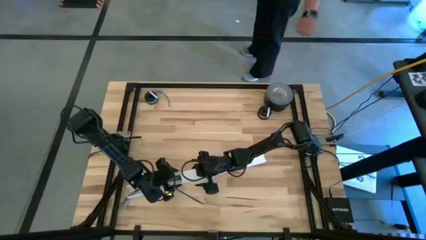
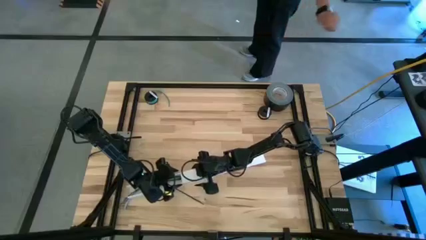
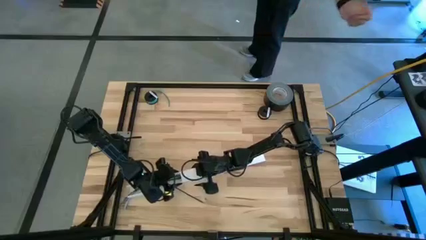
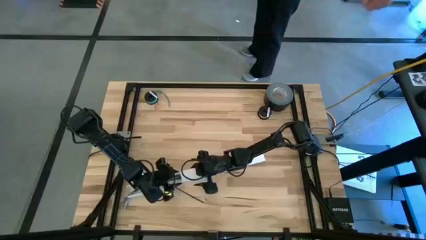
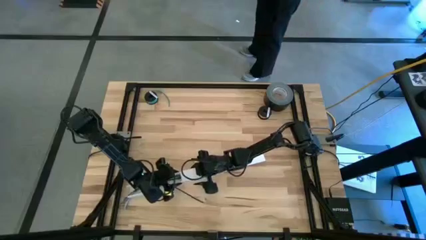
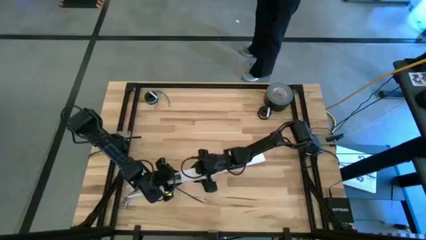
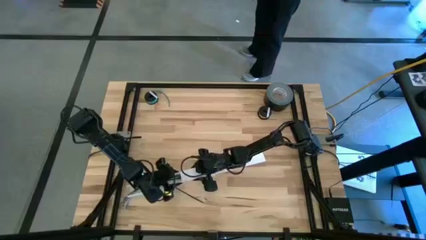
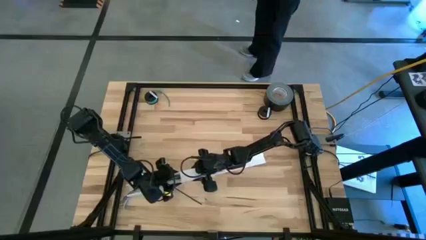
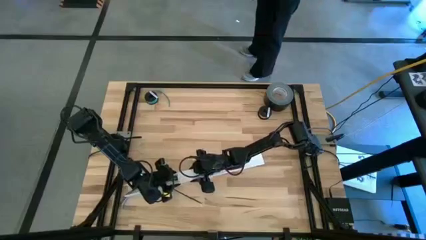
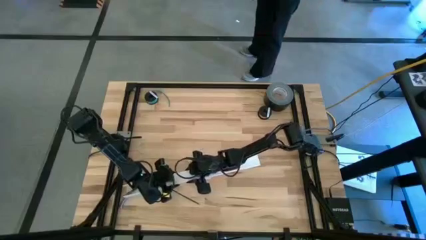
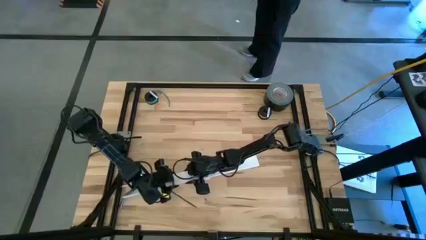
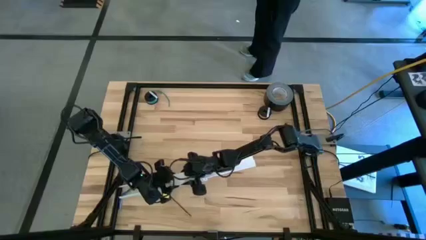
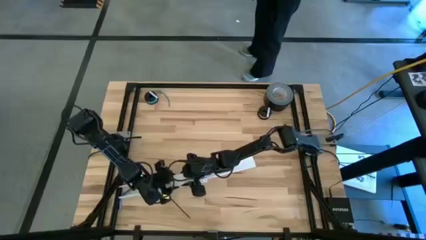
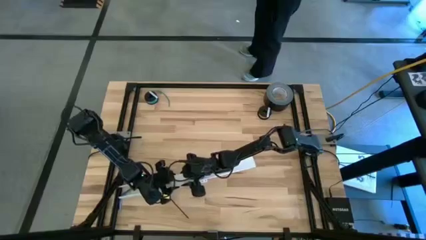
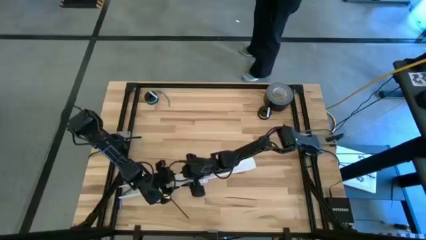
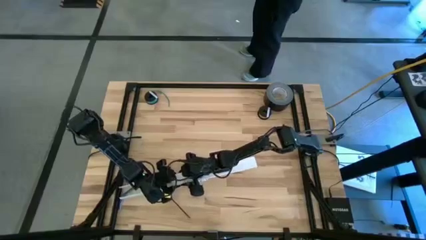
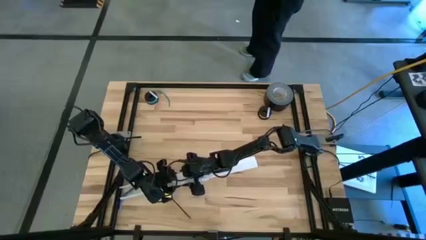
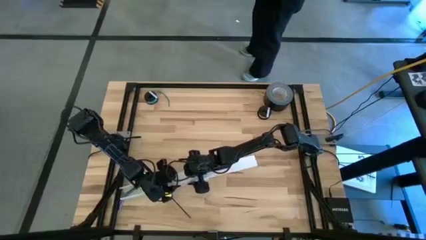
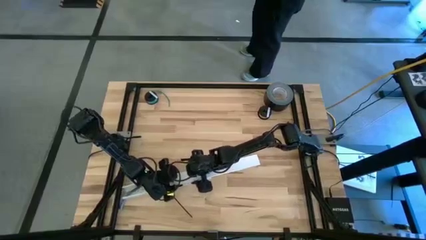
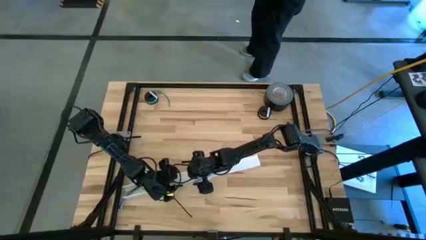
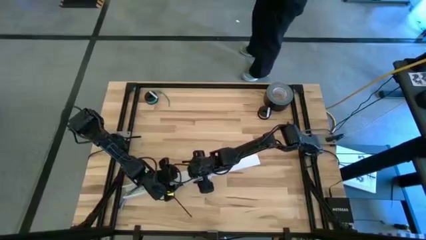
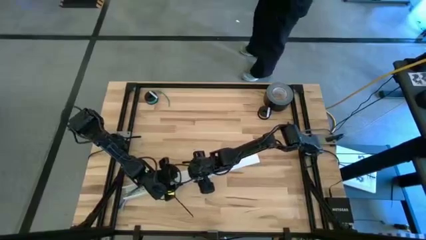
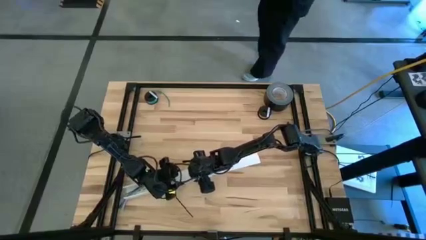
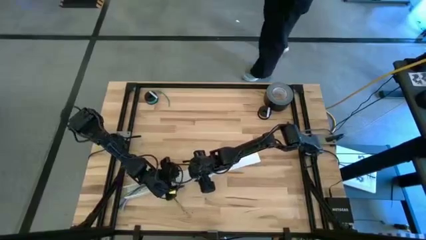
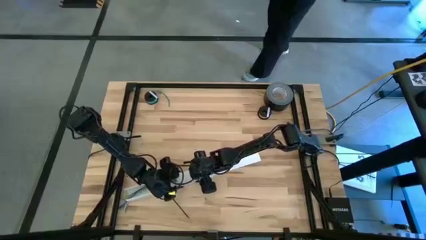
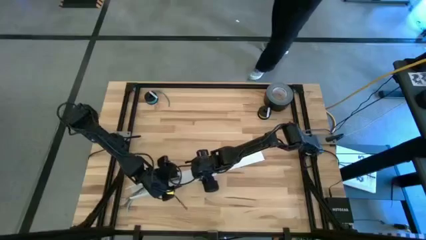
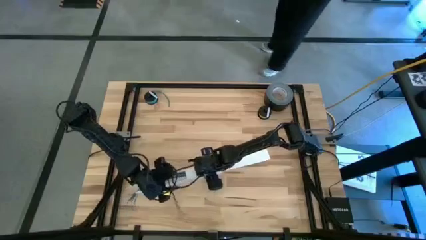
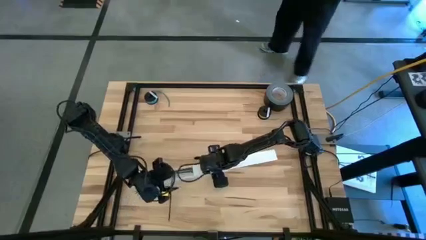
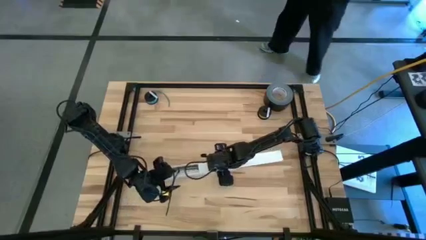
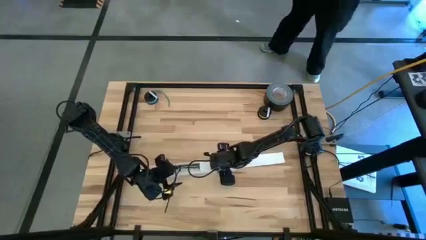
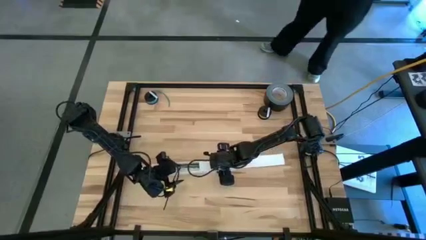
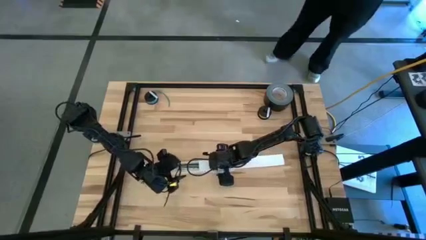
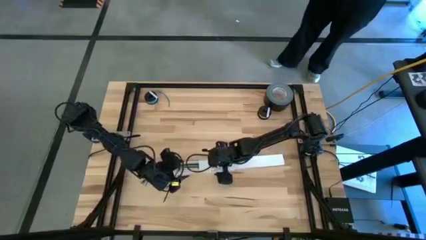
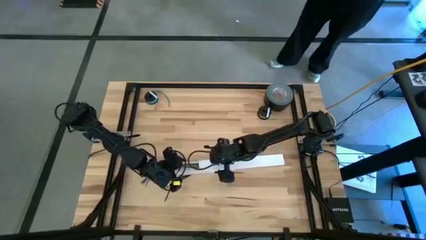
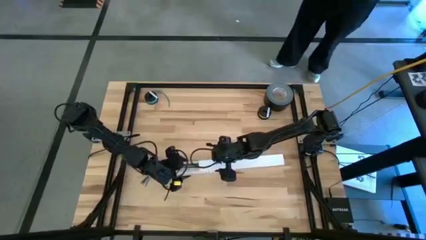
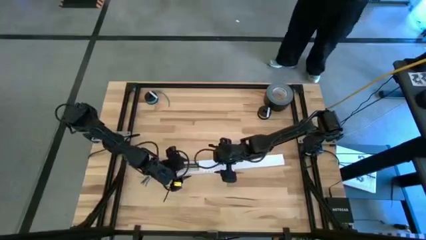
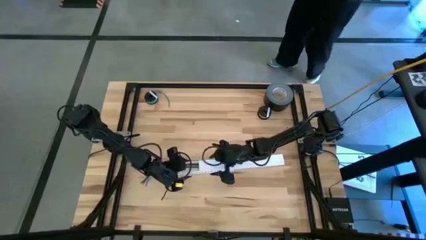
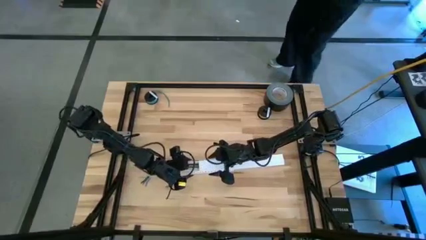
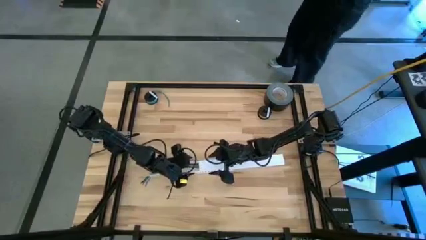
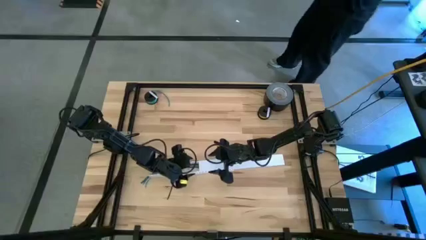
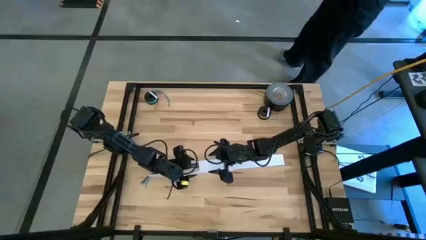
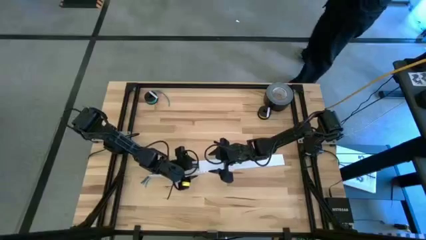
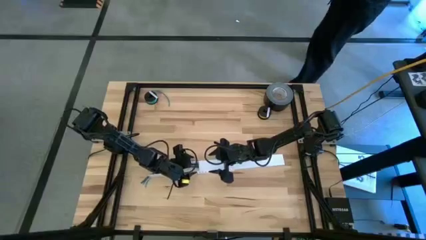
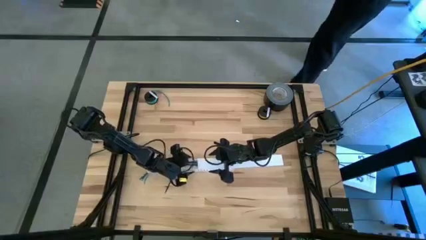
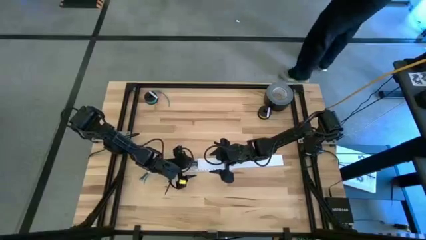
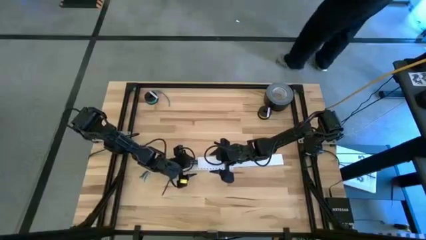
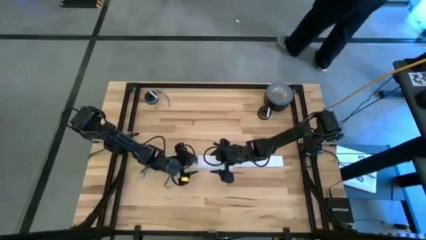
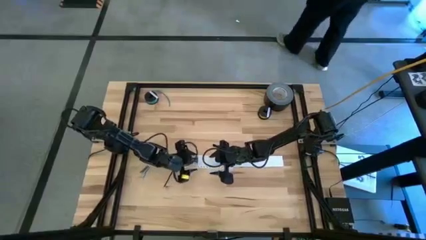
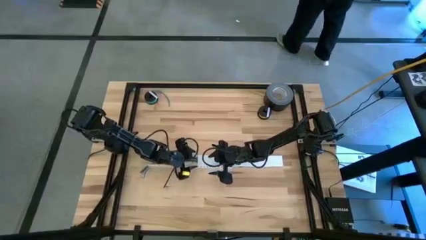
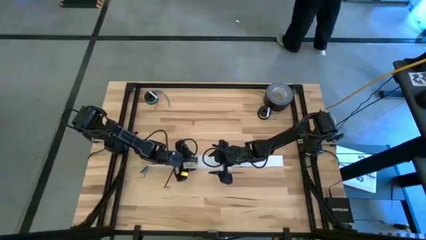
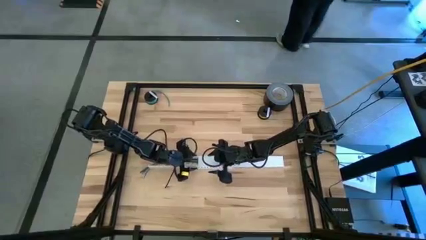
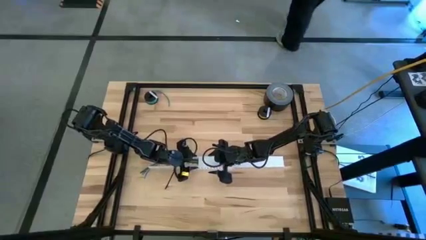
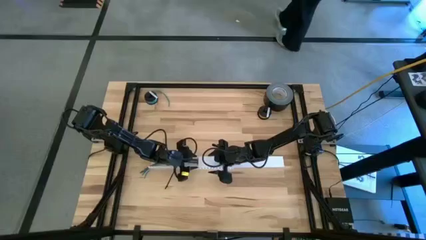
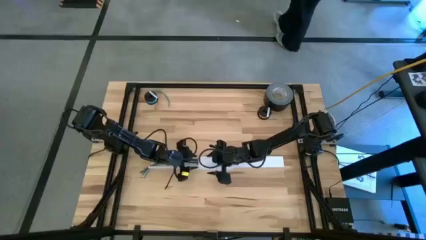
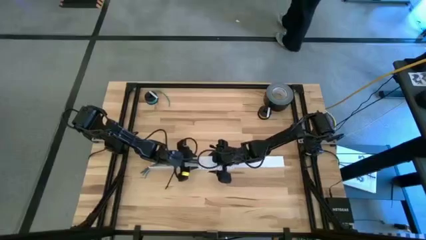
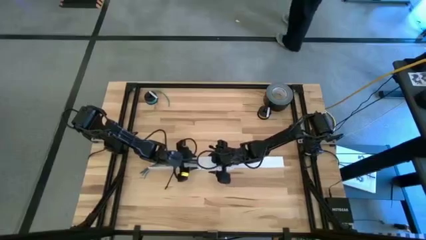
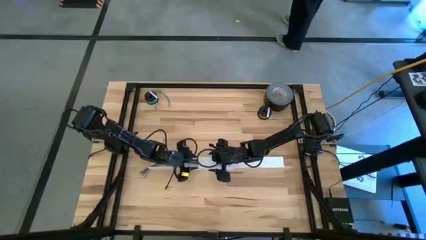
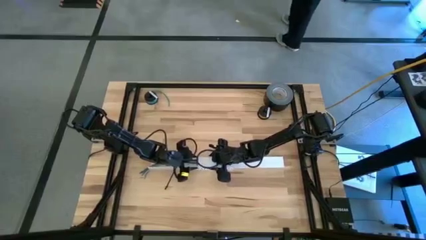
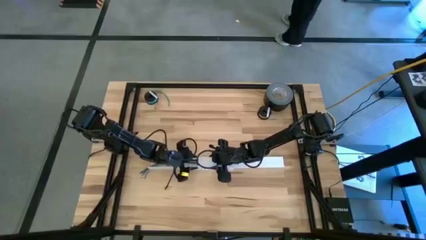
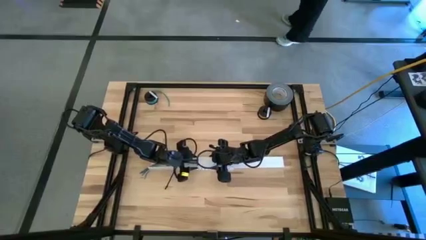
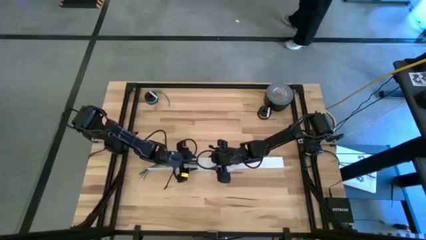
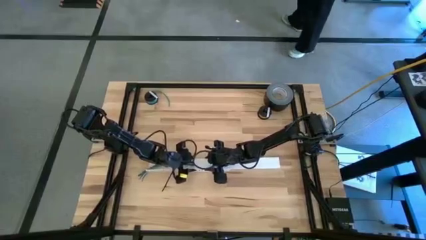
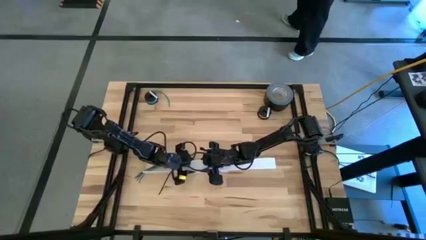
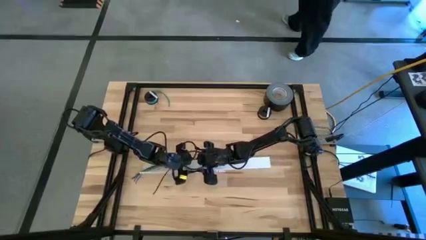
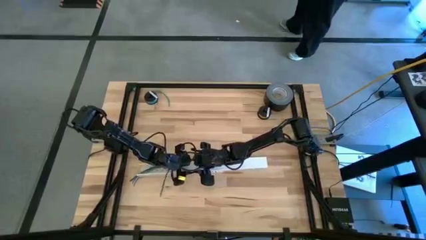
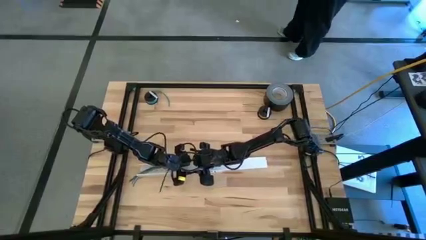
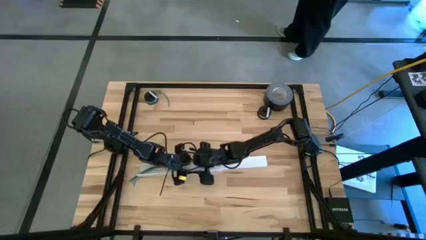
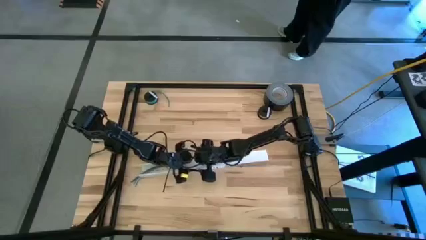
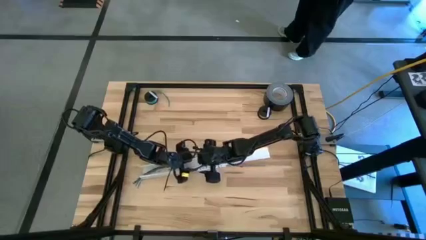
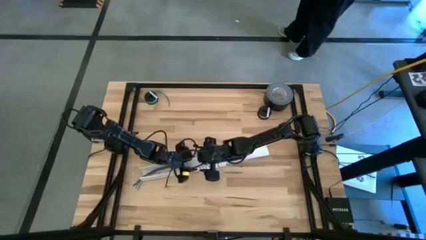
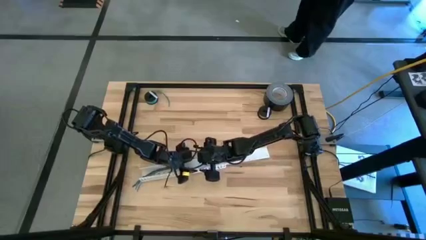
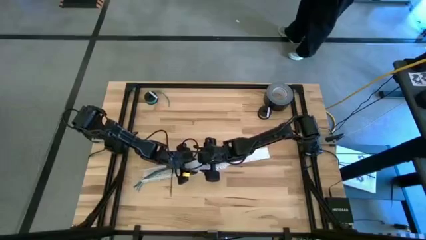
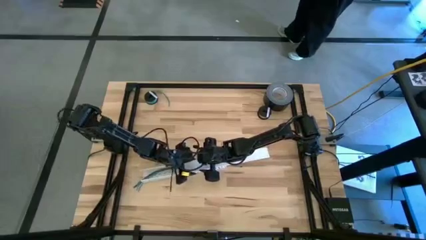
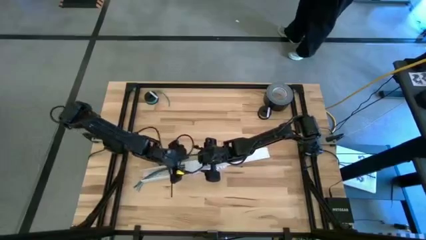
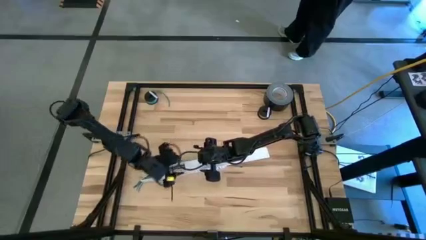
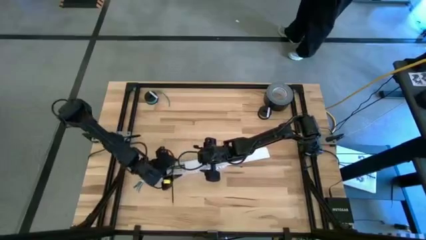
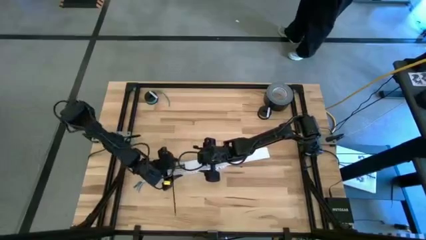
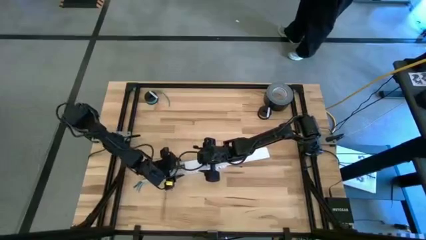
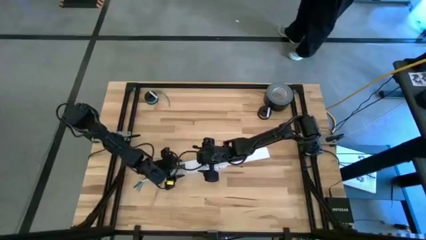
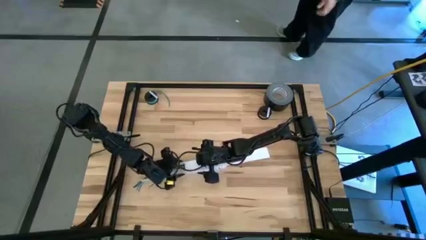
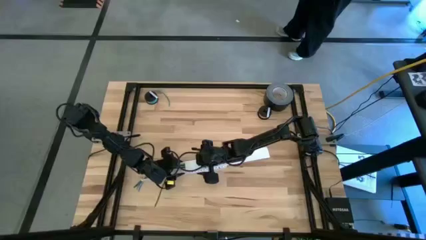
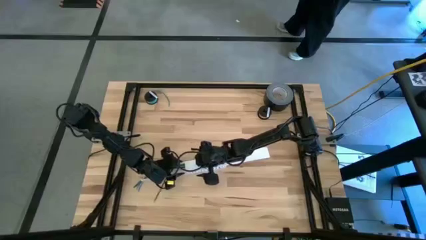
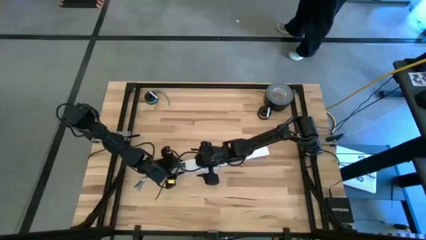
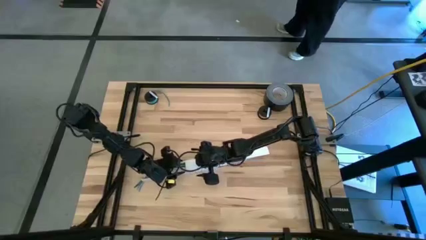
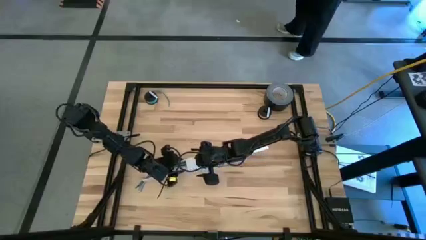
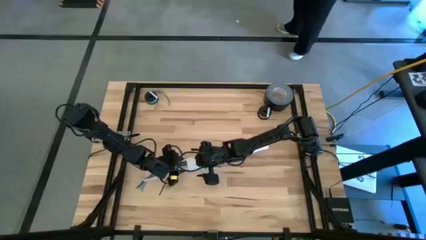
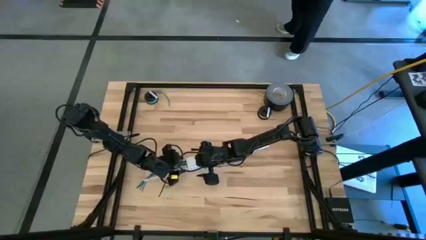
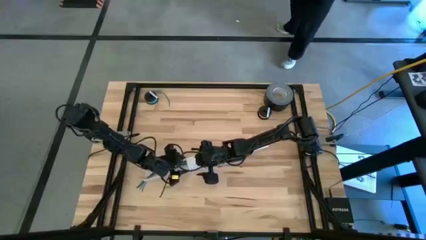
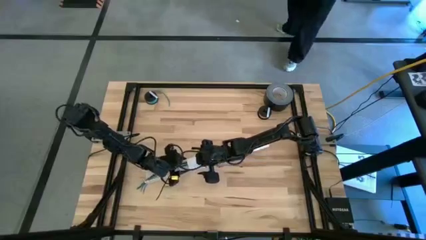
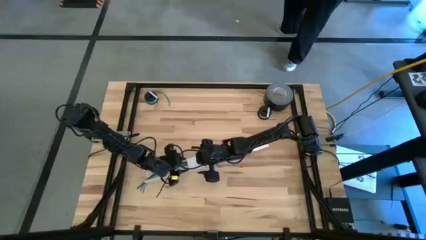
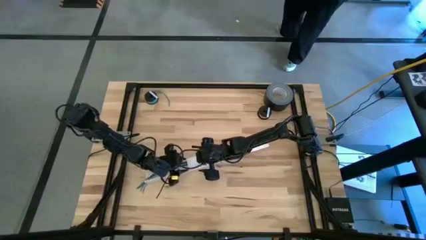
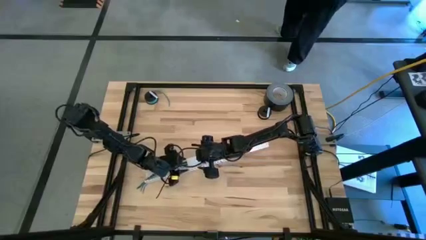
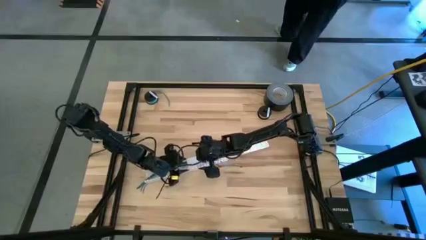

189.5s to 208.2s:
Task: Ziptie cables
Close the white cable duct
